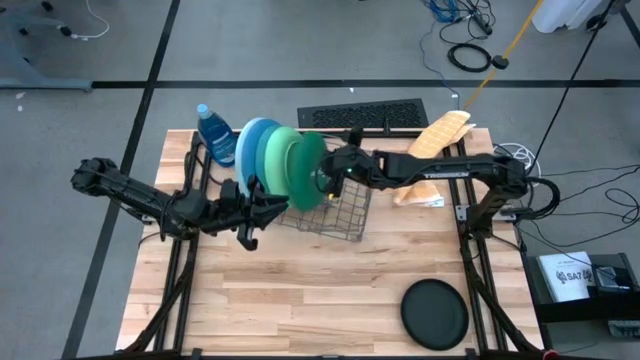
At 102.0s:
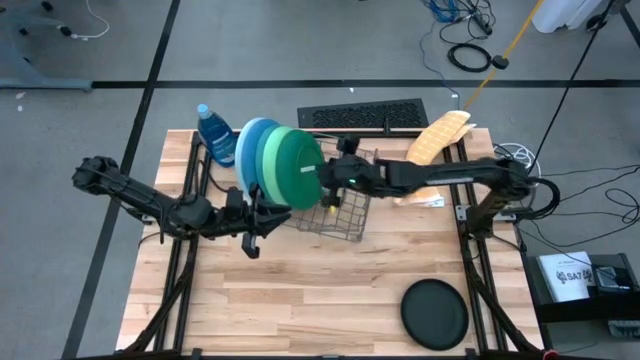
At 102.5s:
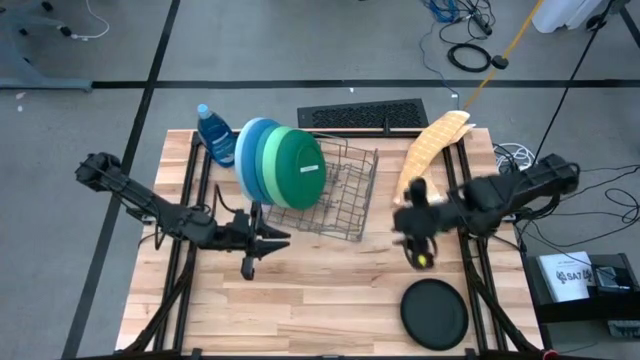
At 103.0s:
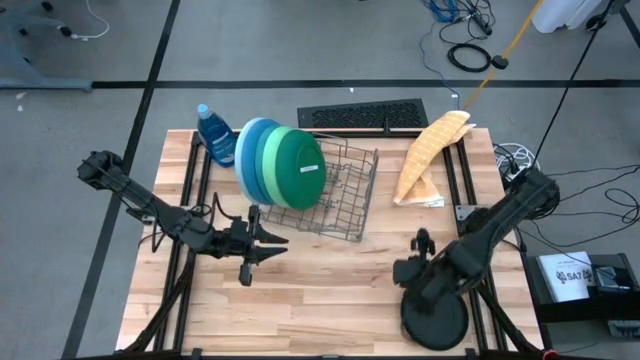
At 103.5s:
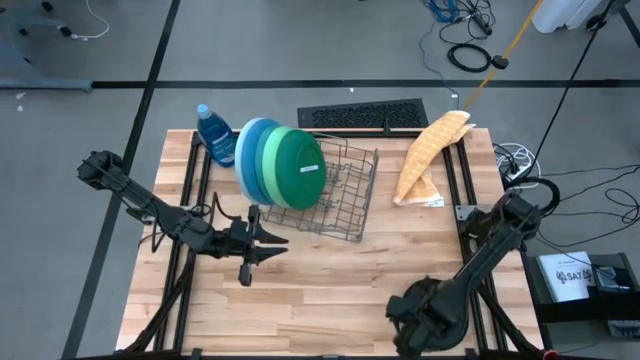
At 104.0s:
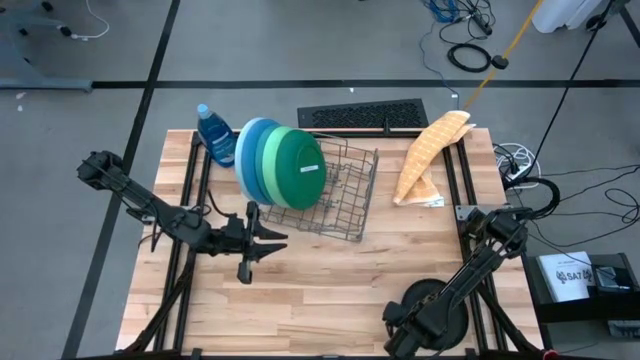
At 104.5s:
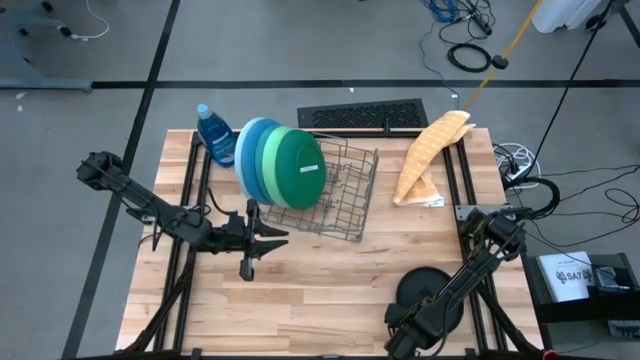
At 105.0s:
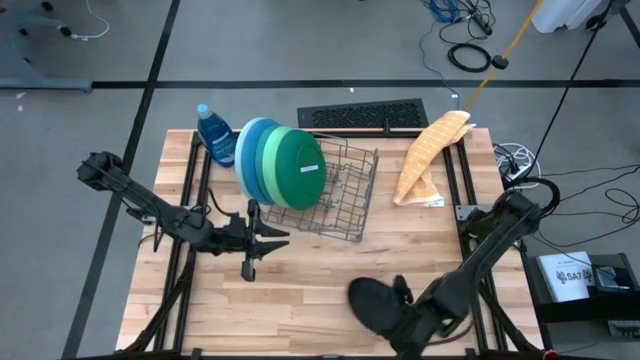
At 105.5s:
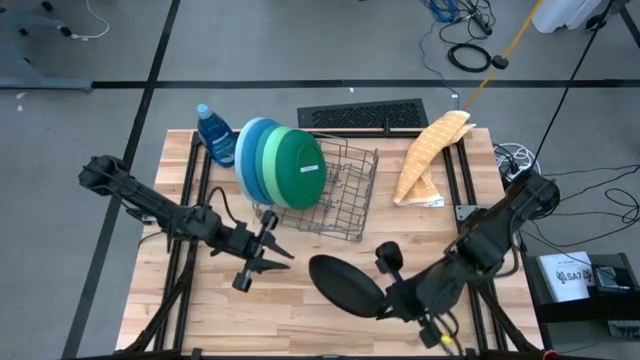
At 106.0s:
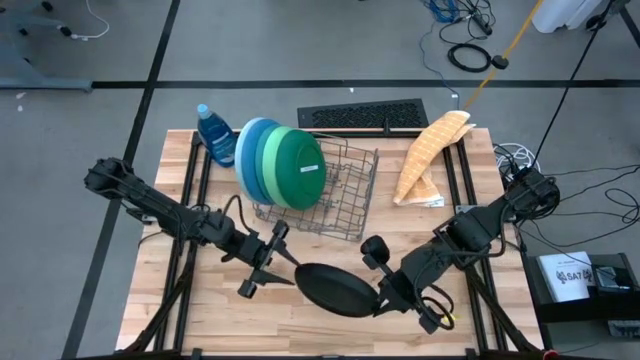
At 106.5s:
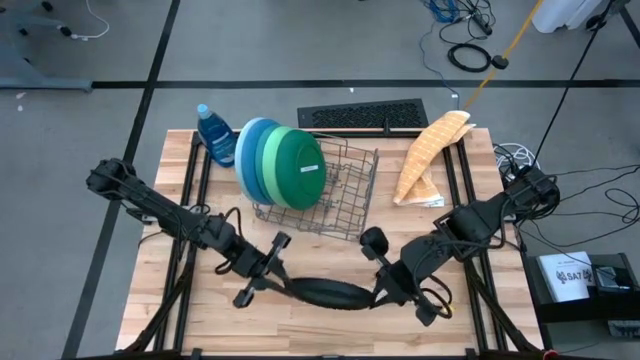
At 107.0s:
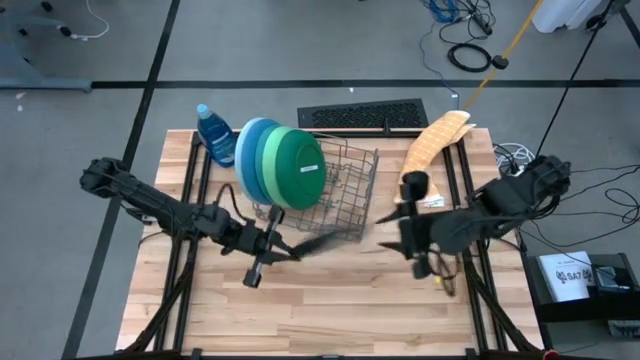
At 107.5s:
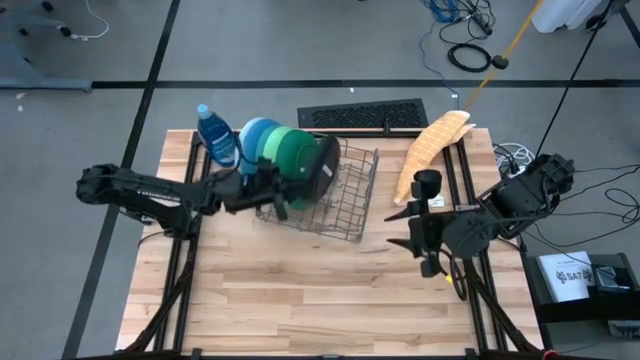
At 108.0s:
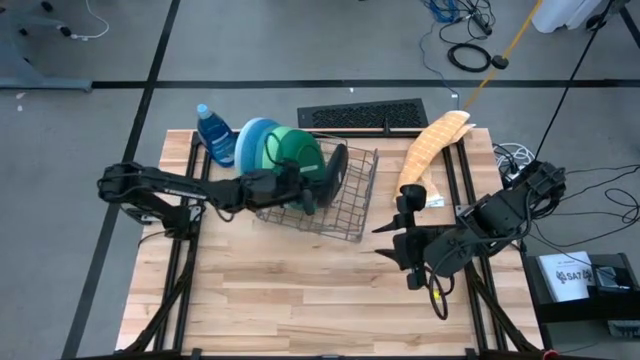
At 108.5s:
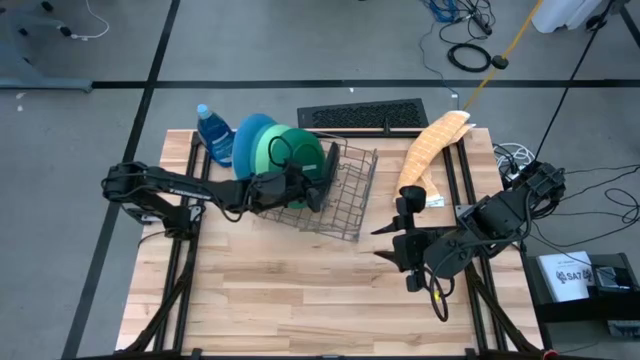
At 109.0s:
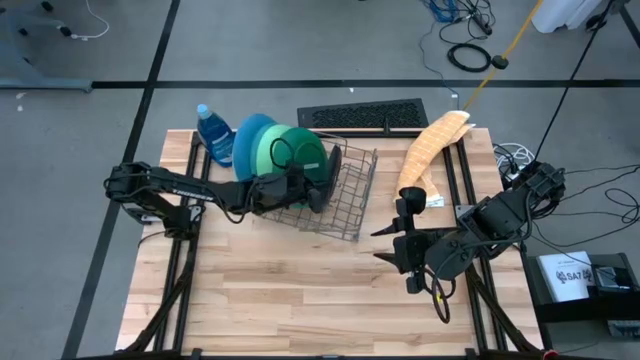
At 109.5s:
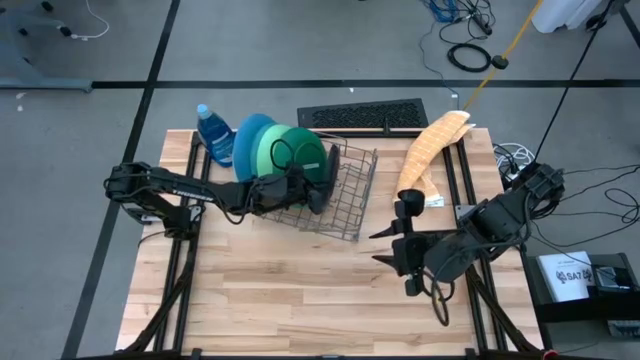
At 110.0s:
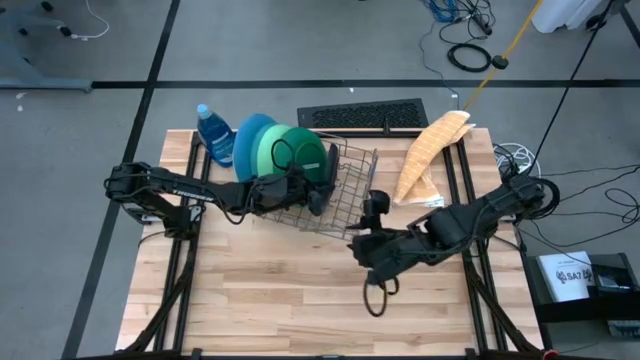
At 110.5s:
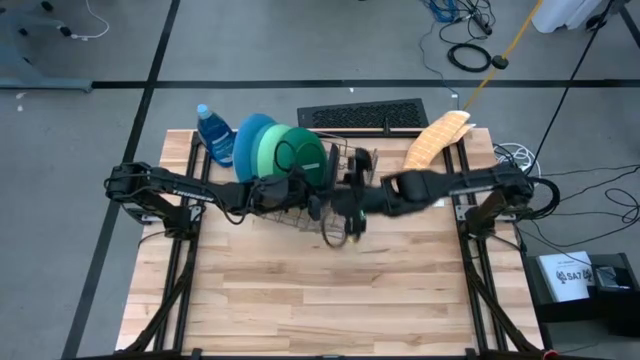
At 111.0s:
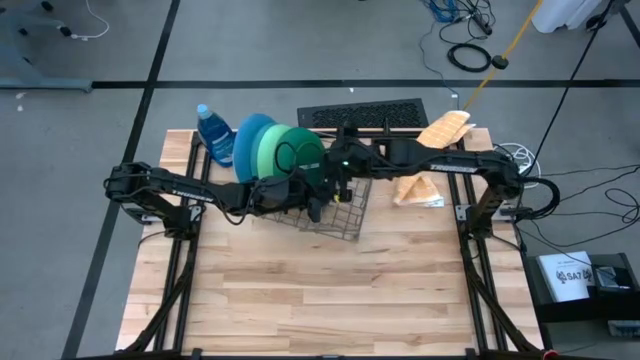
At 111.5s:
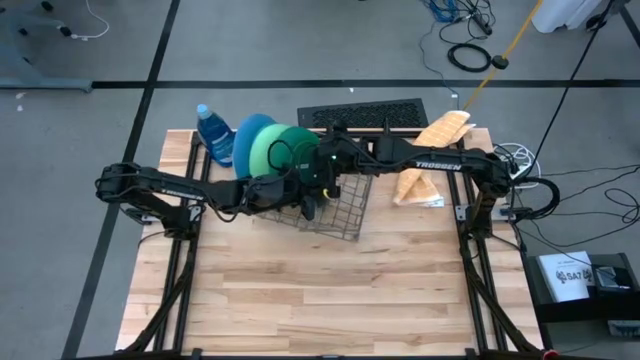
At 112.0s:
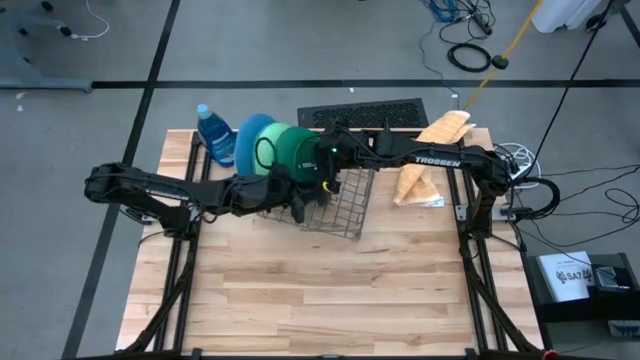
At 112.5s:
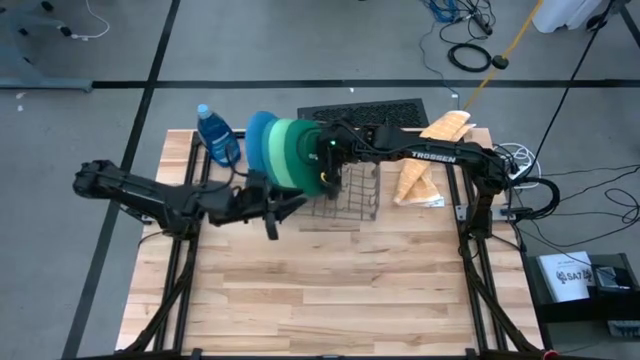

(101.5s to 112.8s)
Task: Sort dishes
Put the black plate into the dish rack

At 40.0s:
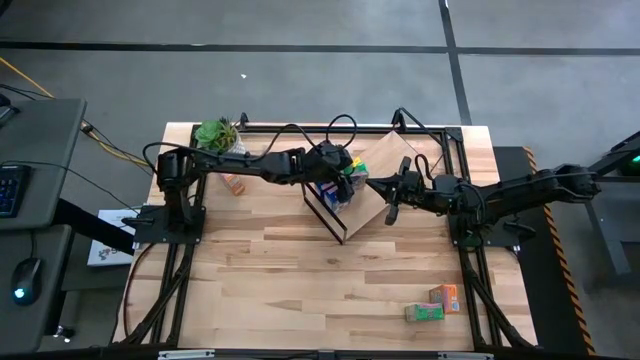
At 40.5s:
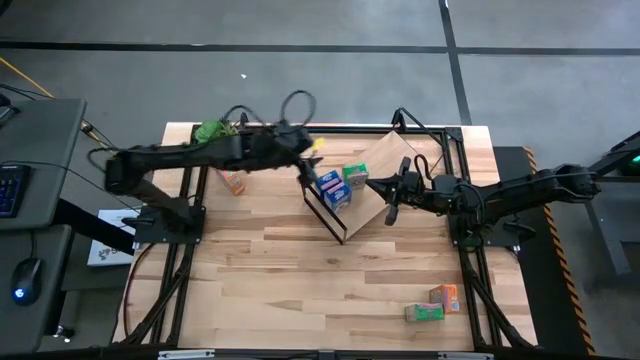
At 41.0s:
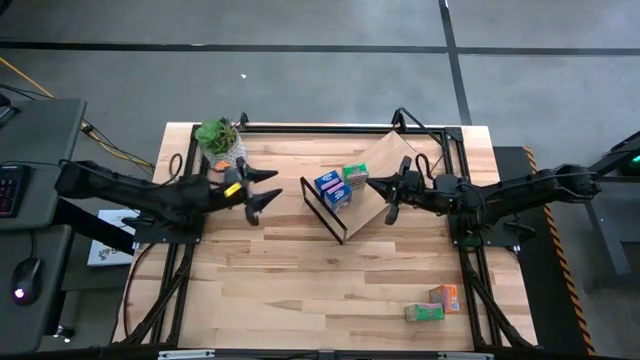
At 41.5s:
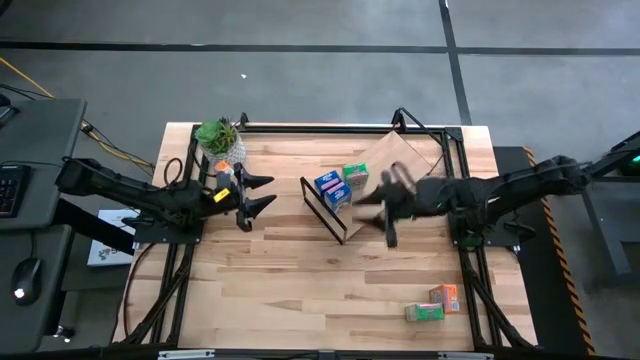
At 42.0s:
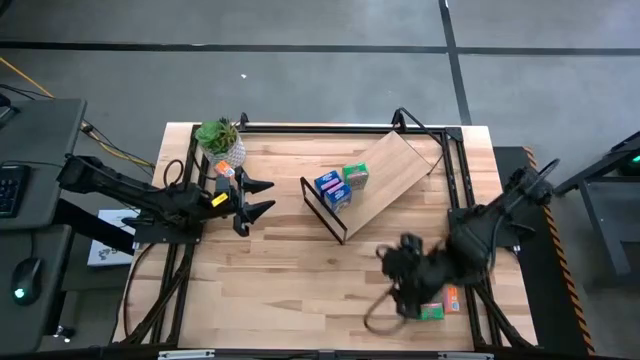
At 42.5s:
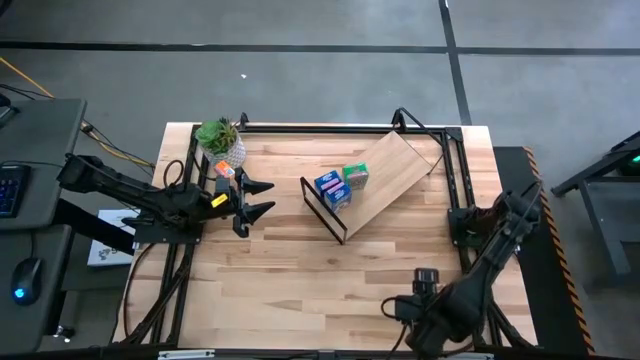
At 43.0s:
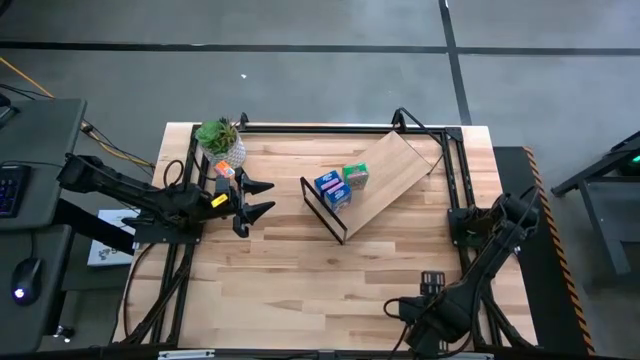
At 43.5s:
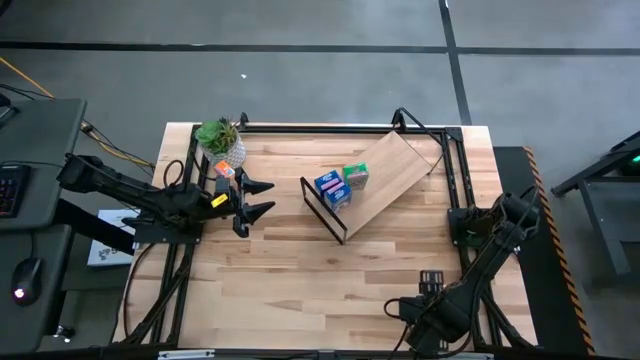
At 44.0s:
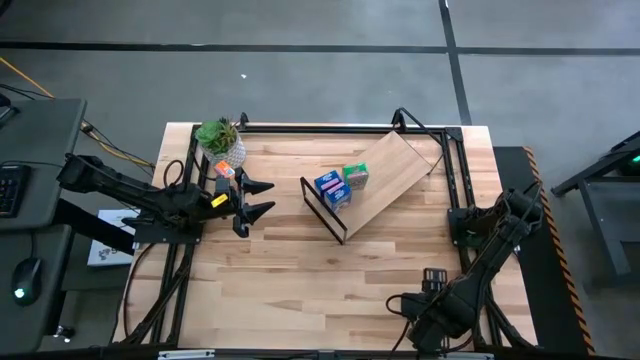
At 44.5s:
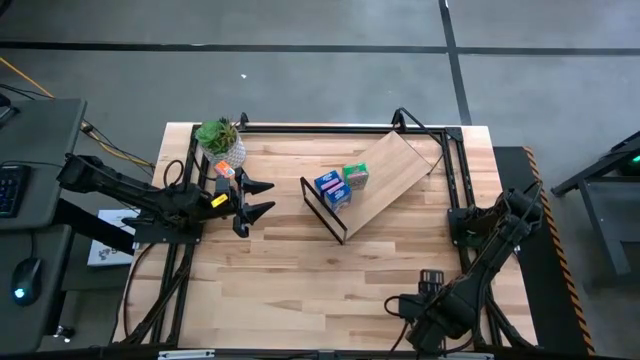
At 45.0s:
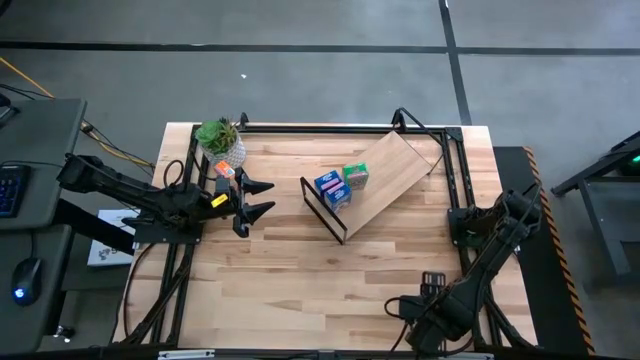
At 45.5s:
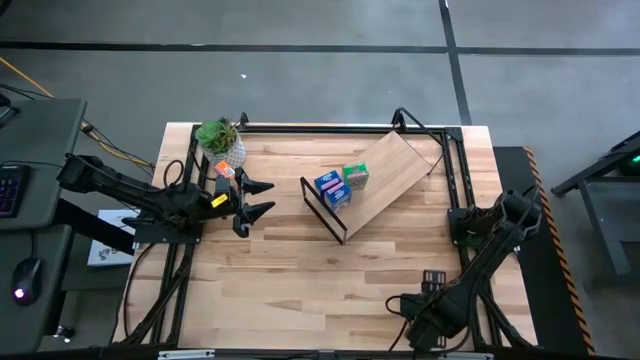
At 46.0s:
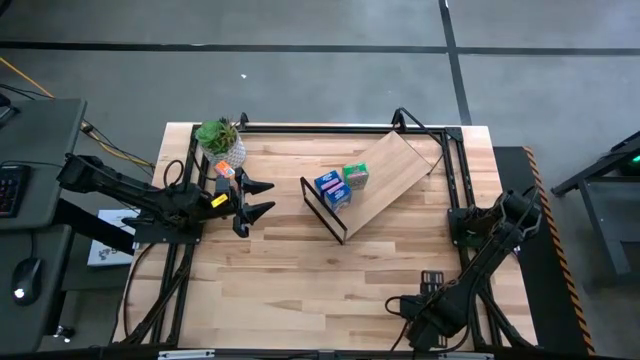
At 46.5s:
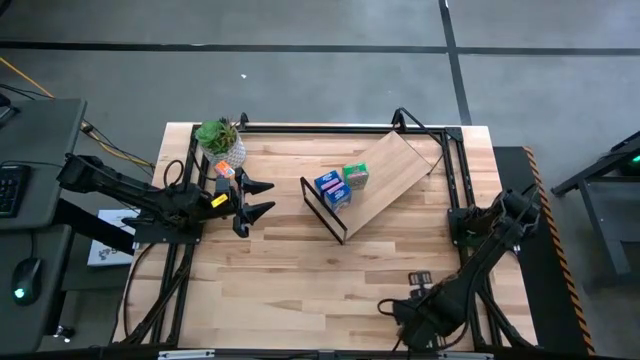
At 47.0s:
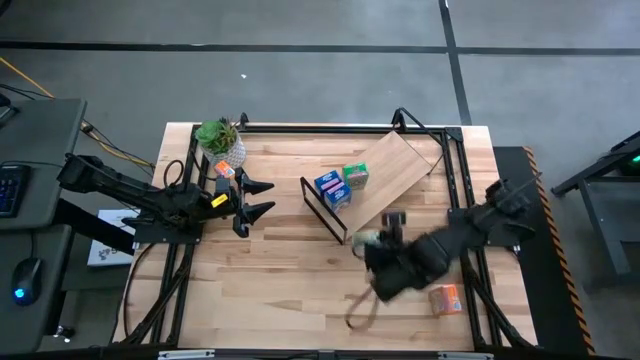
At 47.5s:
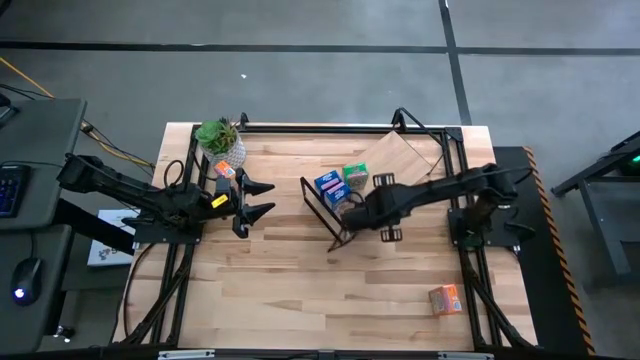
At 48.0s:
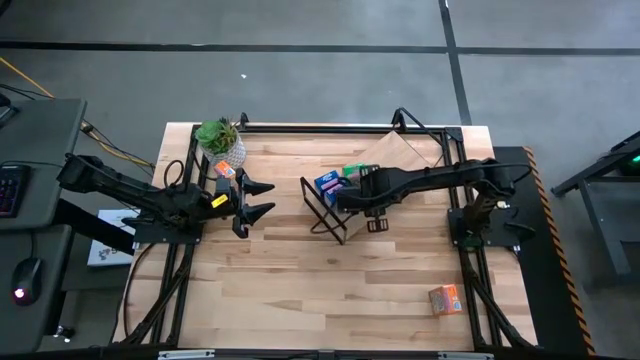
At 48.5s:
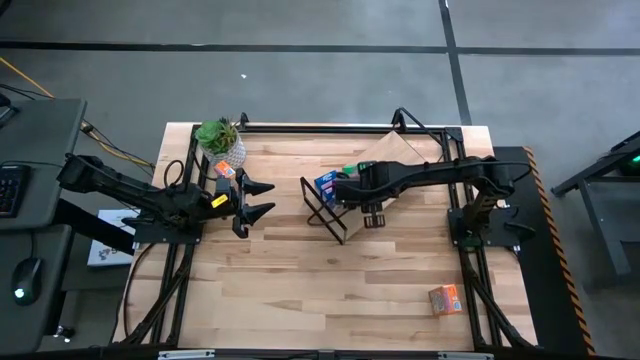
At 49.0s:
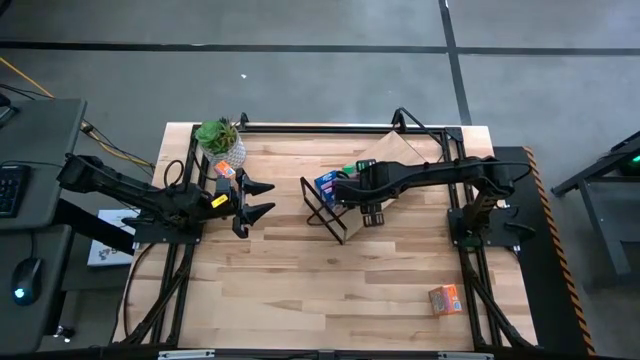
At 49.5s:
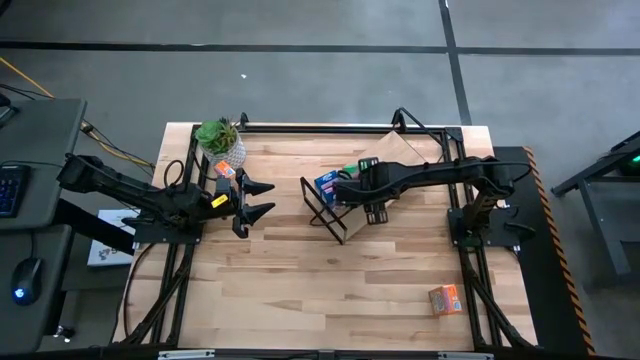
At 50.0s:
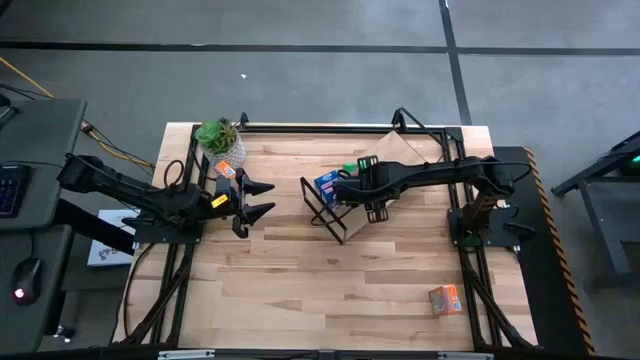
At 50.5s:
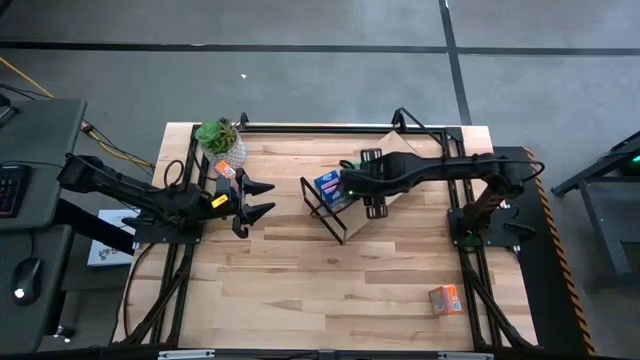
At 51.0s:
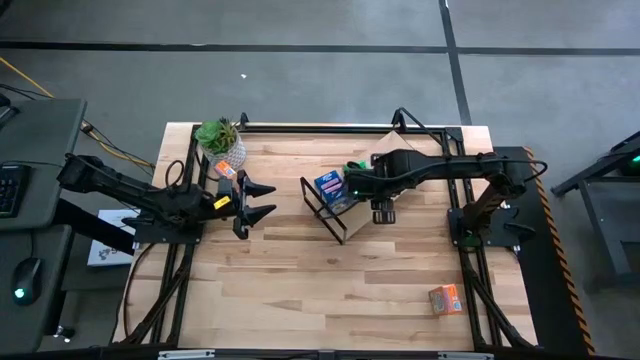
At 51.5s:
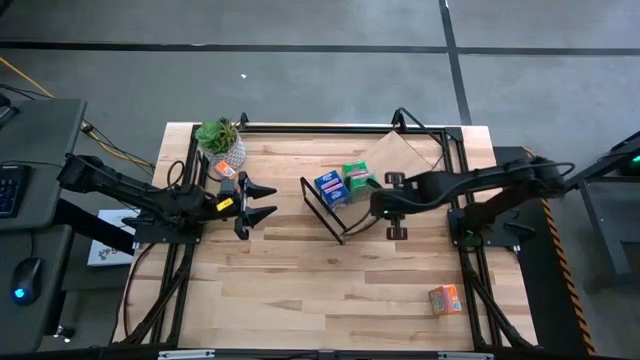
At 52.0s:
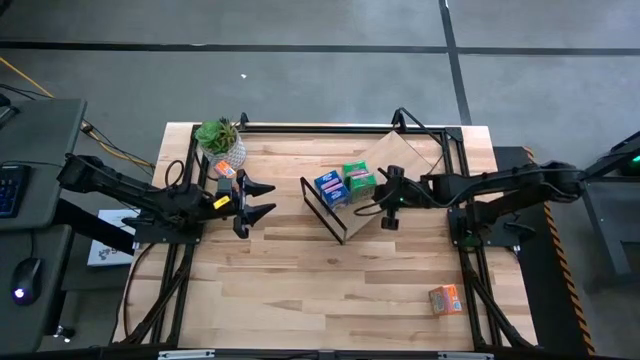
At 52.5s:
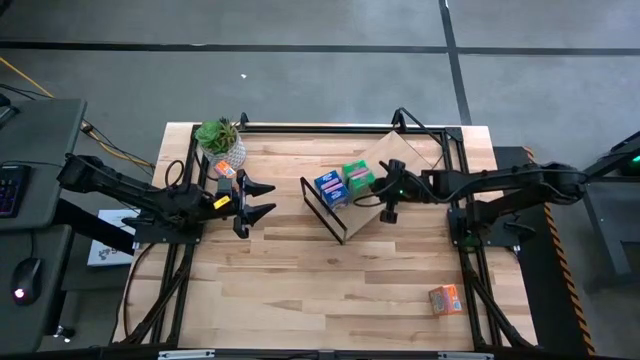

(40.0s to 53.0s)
Task: Stack cereal on shelf
Put the green cereal box aligned with the other green cereal box on the shelf
